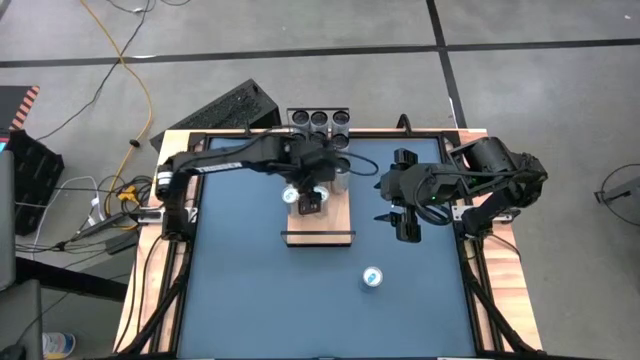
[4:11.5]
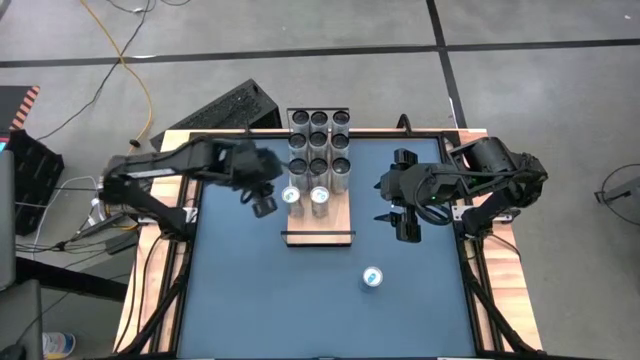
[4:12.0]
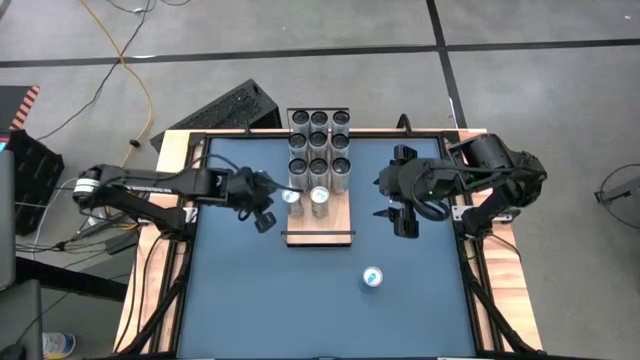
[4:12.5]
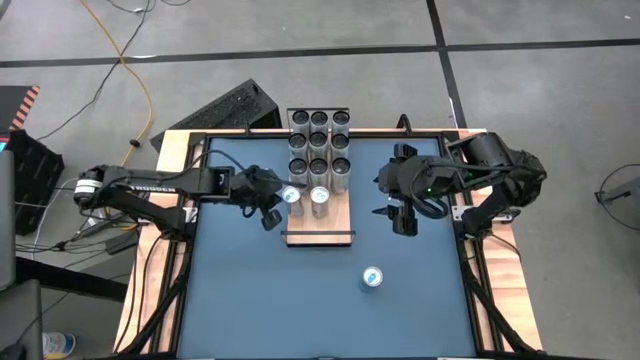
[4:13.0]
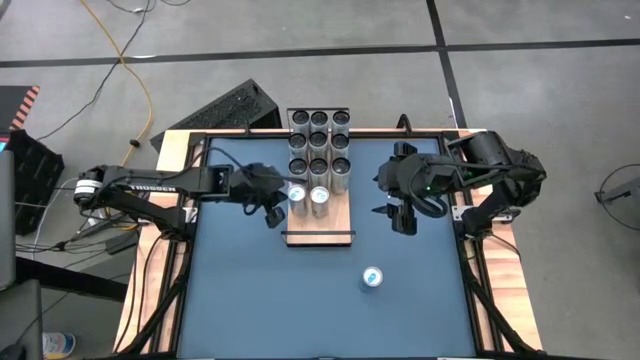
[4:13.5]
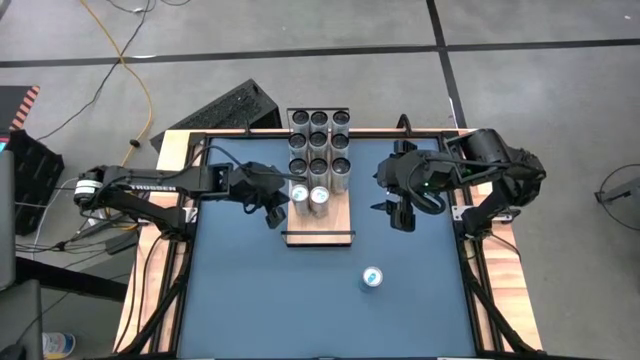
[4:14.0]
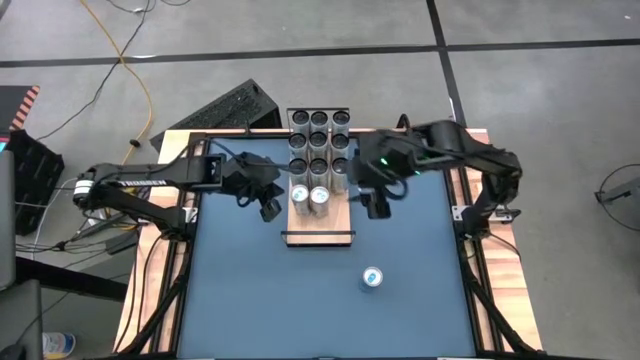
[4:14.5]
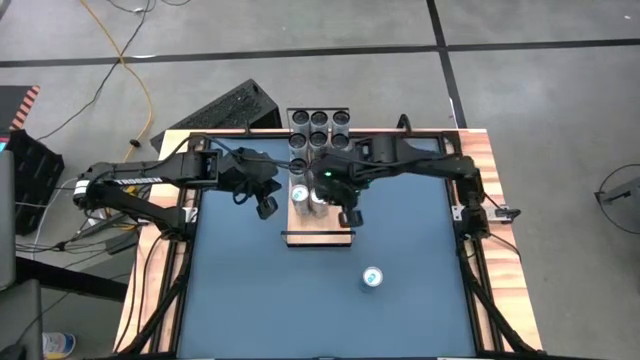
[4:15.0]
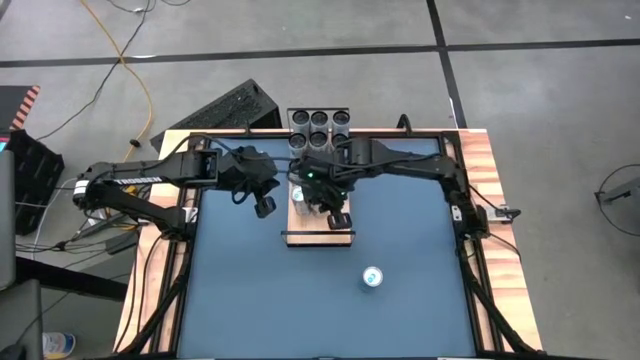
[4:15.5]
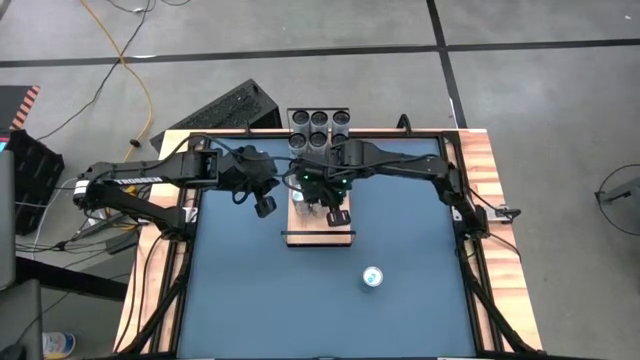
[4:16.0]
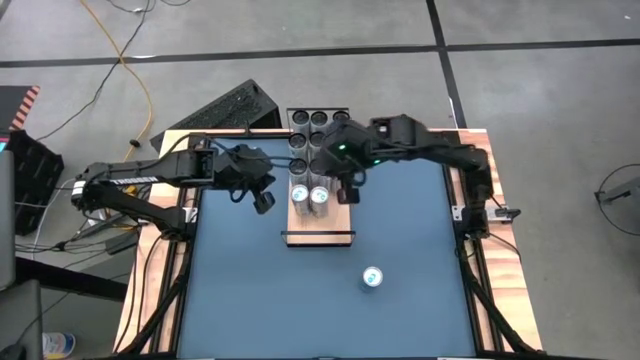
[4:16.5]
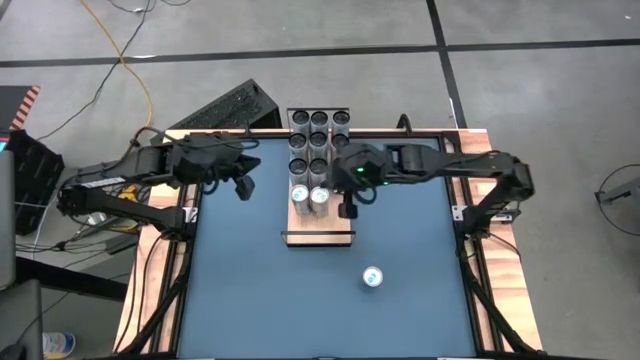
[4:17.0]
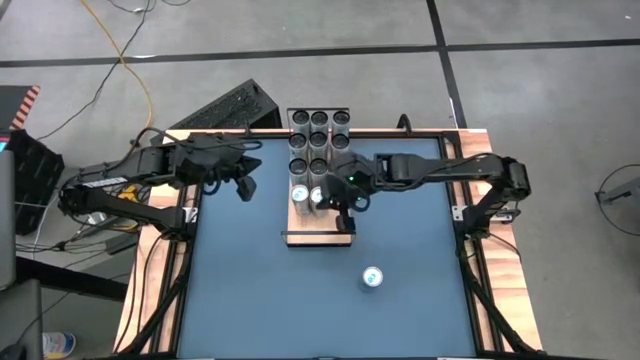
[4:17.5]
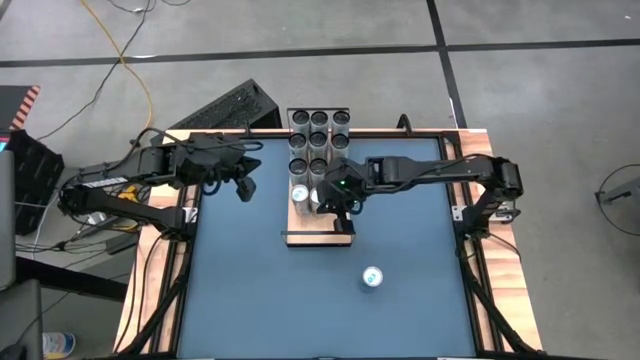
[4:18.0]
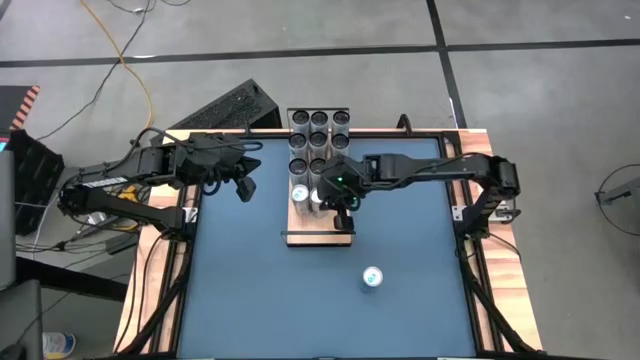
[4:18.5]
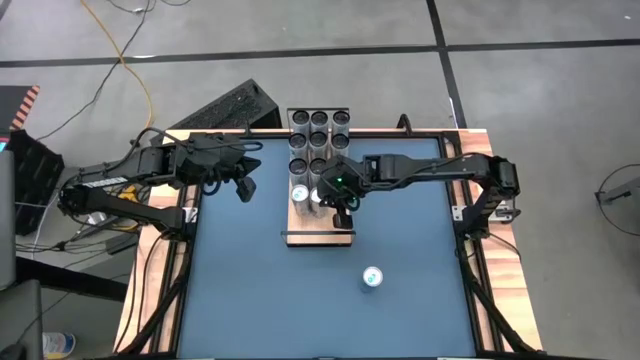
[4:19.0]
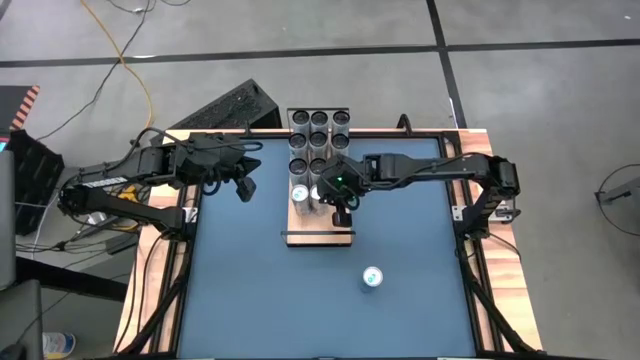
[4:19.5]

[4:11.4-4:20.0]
Task: Place canned beverage on shelf
Adjust the blue soda cans on the shelf

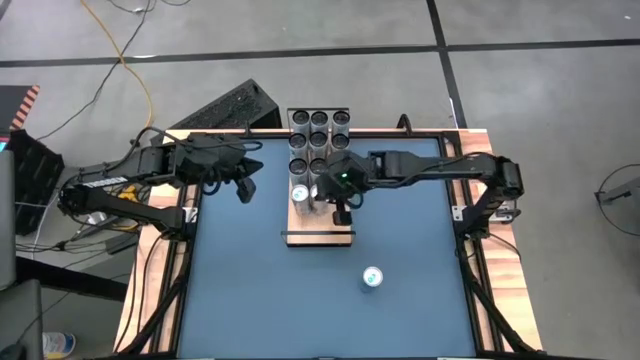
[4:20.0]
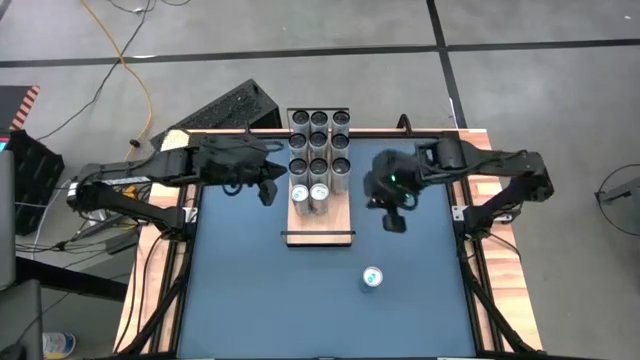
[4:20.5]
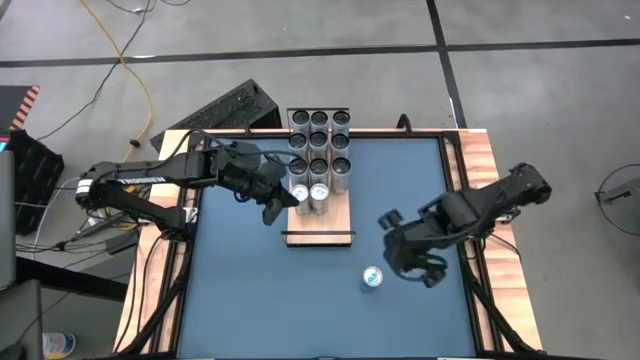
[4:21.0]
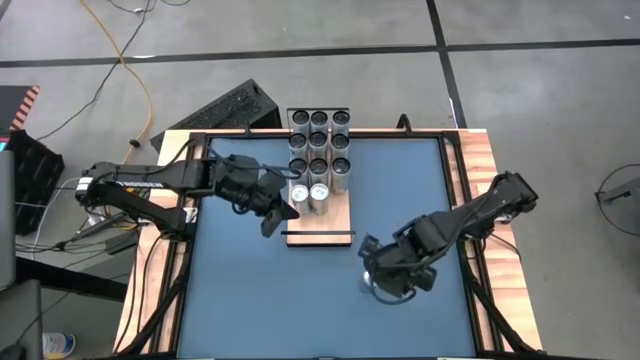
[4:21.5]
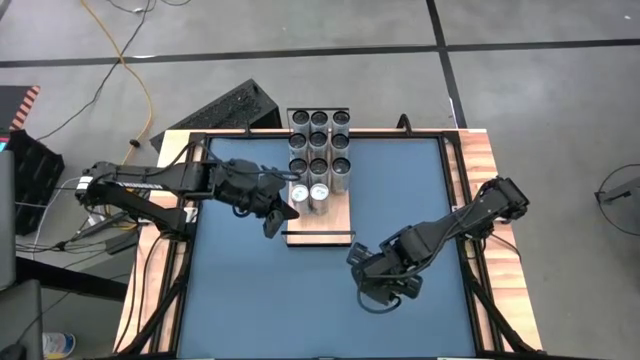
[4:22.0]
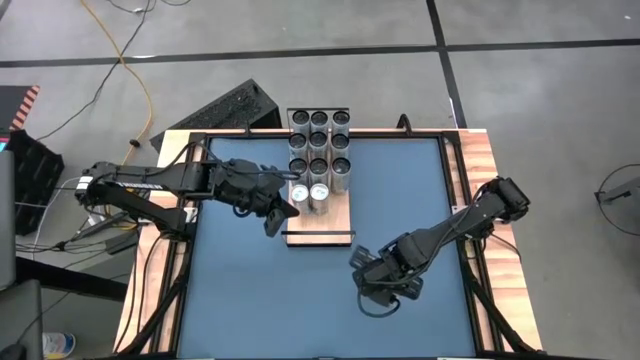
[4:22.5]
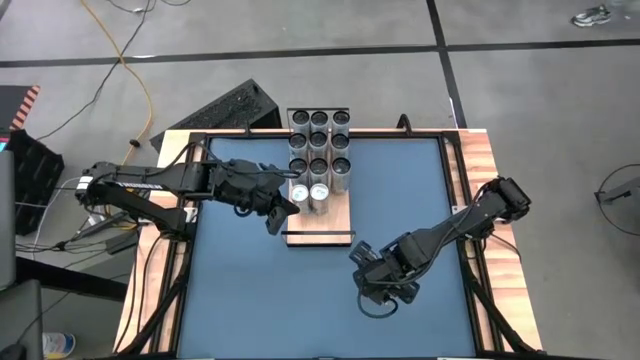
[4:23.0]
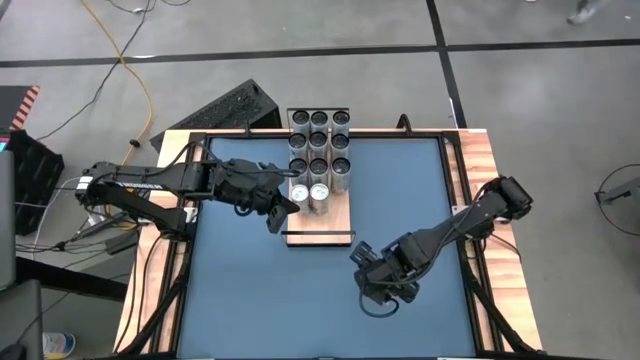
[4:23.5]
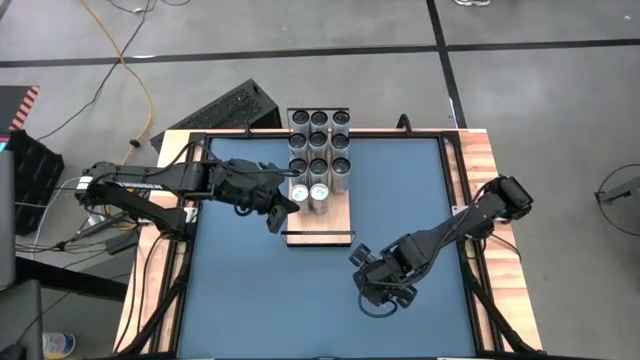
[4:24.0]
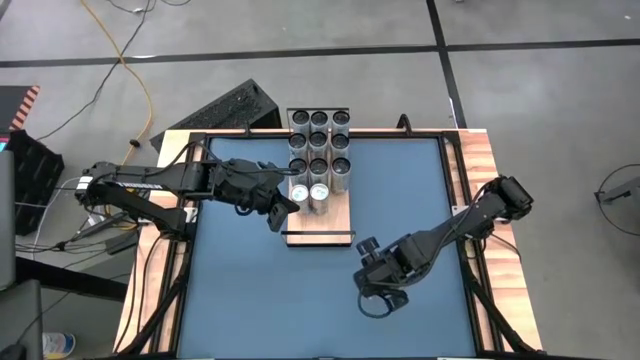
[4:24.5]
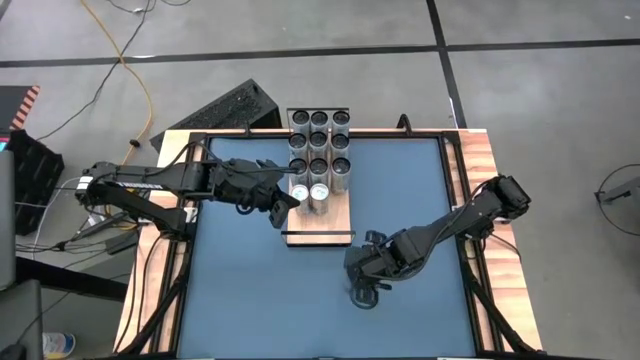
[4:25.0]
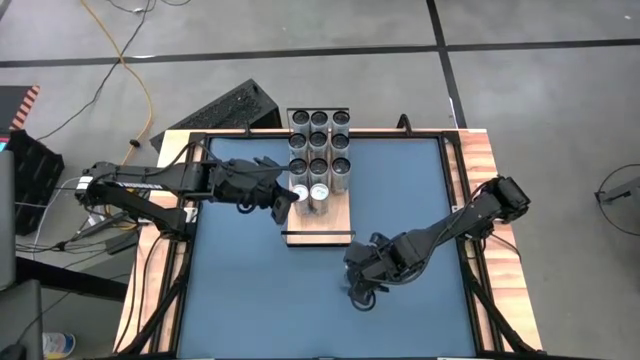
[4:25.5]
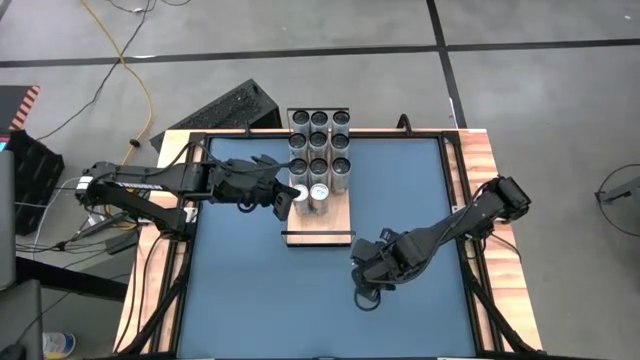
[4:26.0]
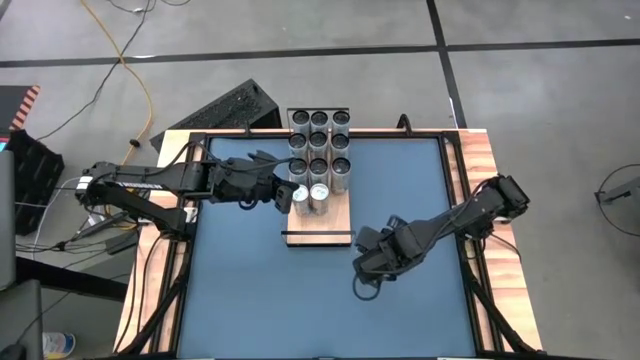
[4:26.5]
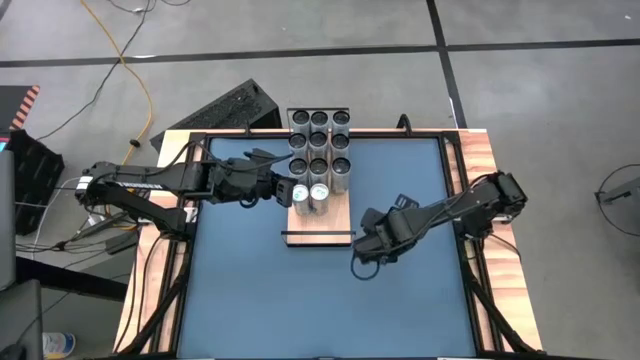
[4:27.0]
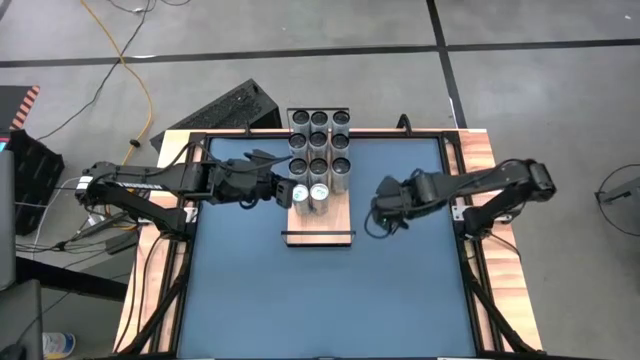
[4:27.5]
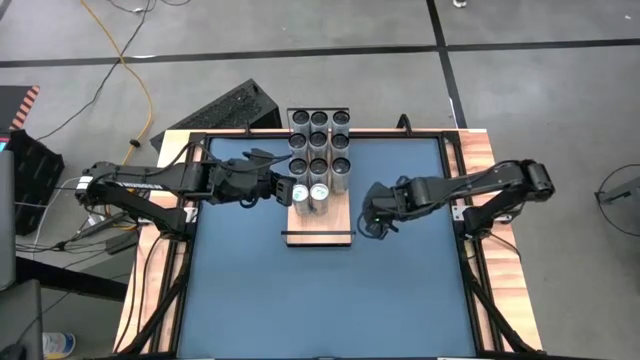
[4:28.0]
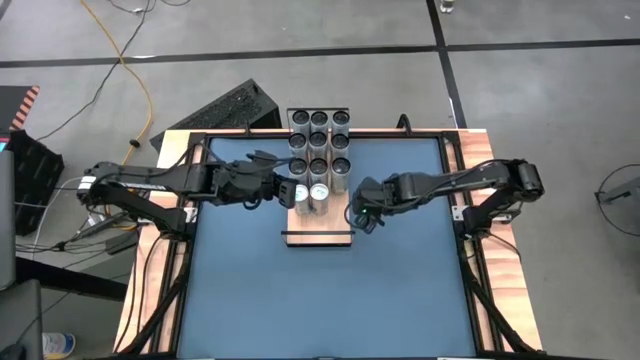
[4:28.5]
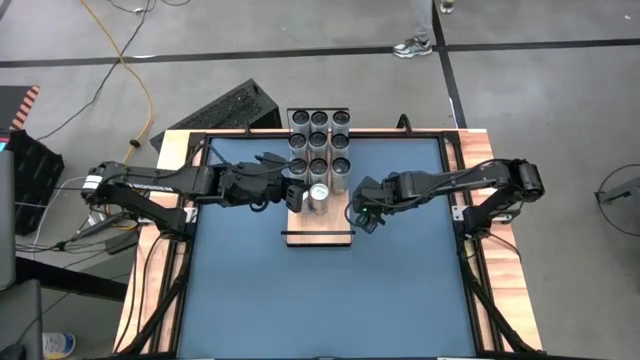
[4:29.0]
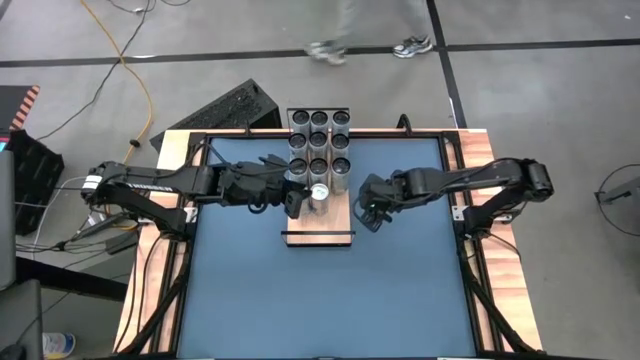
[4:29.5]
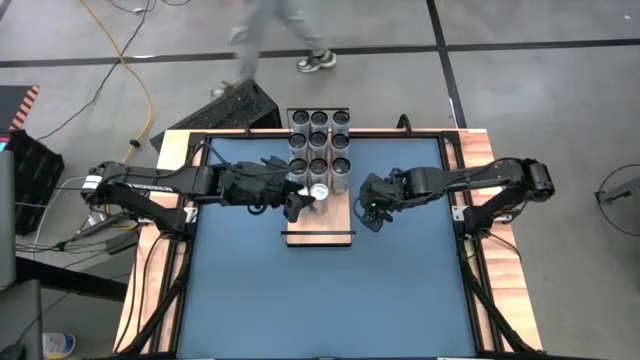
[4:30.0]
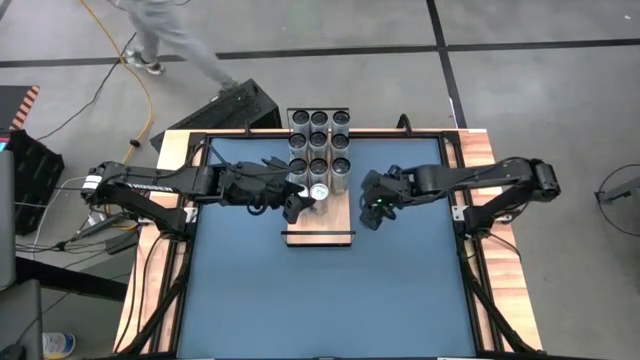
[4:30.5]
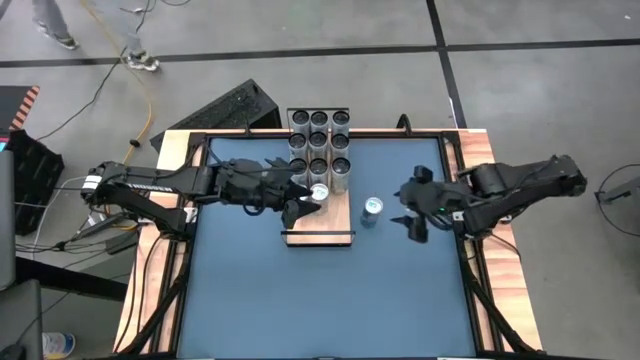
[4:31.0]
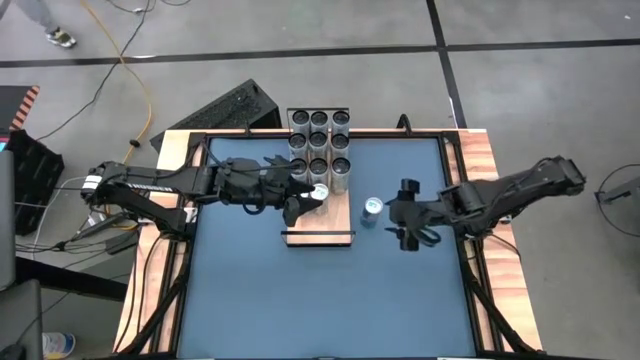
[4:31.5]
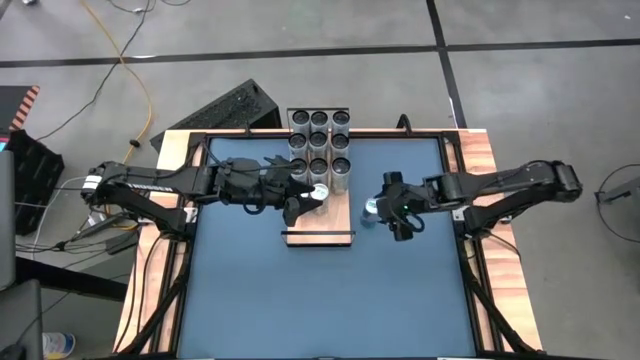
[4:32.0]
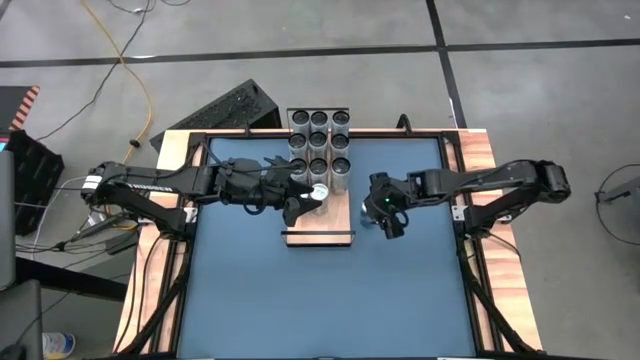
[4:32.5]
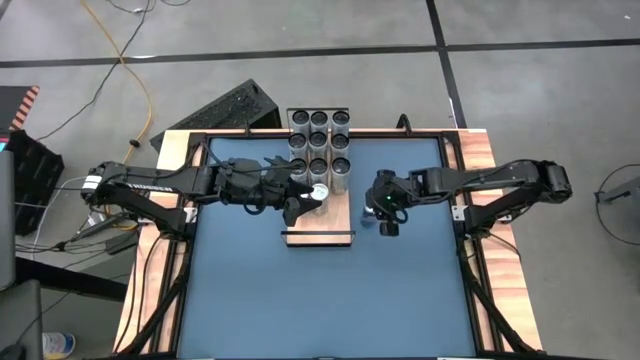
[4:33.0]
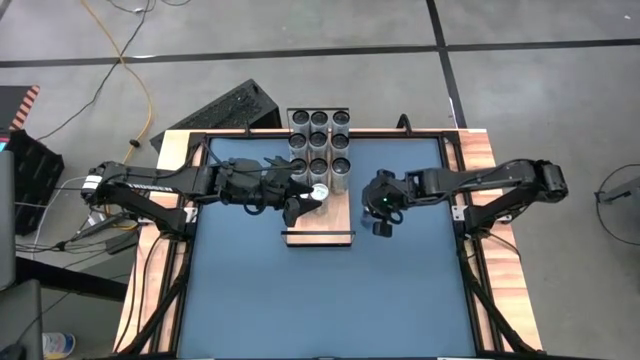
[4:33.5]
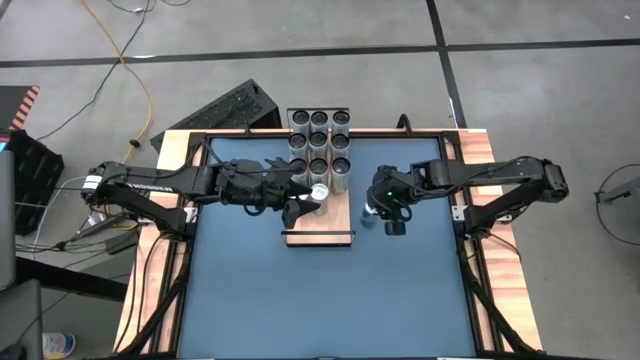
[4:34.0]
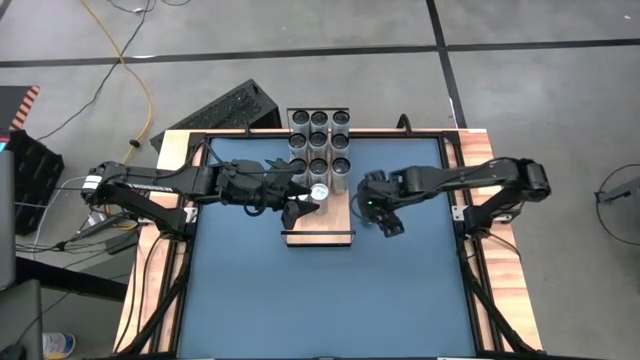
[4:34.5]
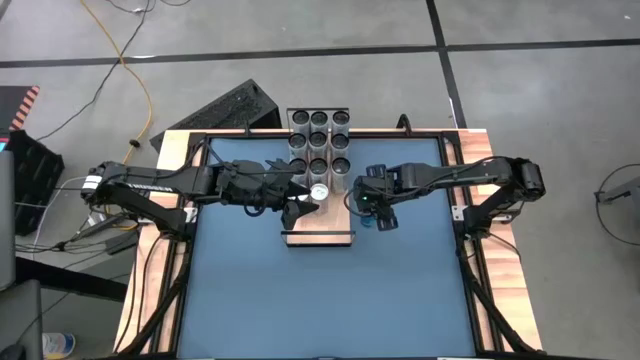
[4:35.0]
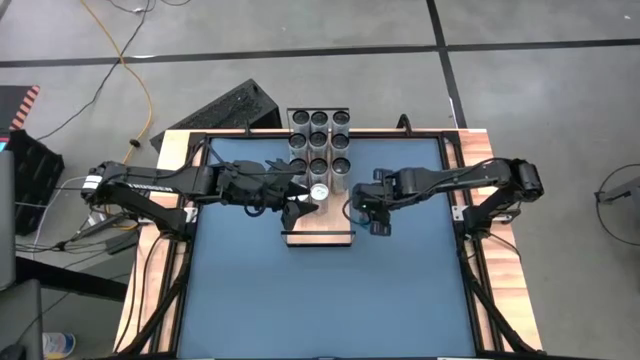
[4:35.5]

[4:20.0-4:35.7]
Put the blue soda can on the shelf
